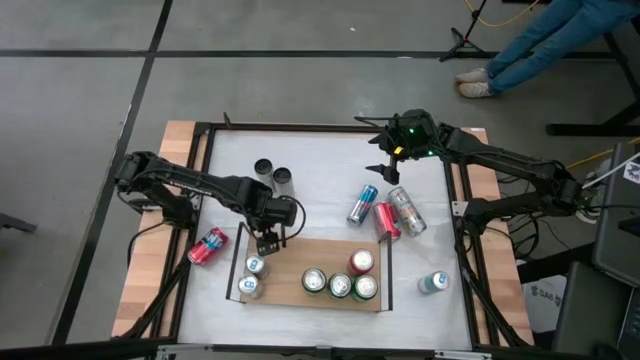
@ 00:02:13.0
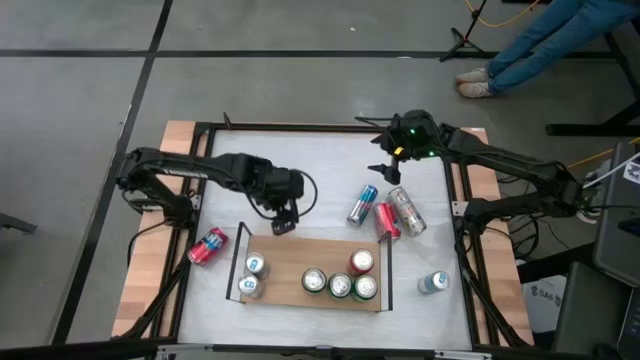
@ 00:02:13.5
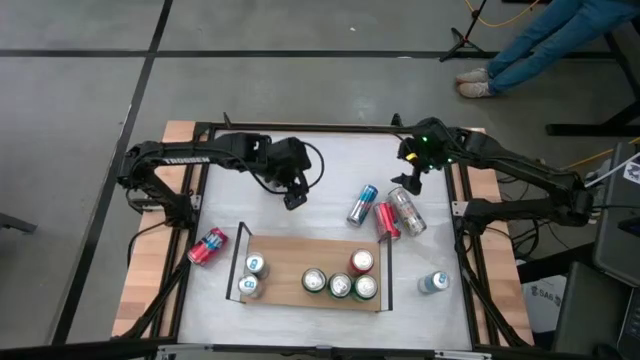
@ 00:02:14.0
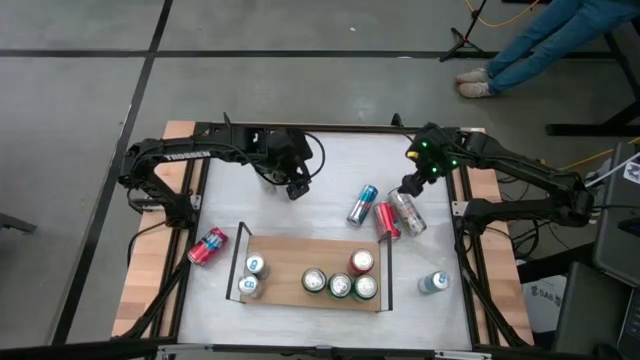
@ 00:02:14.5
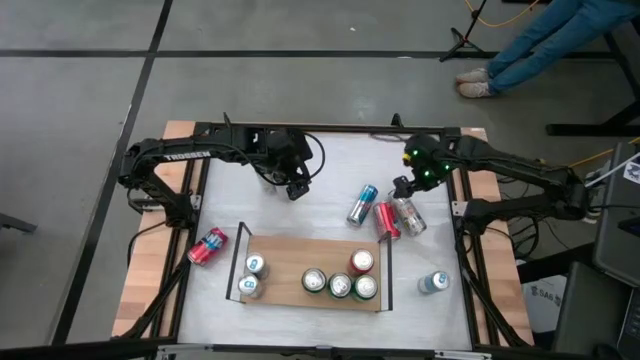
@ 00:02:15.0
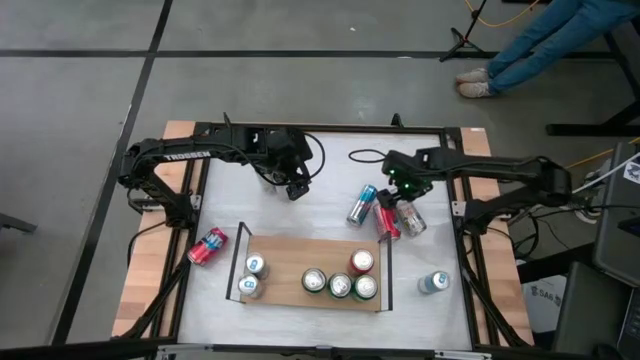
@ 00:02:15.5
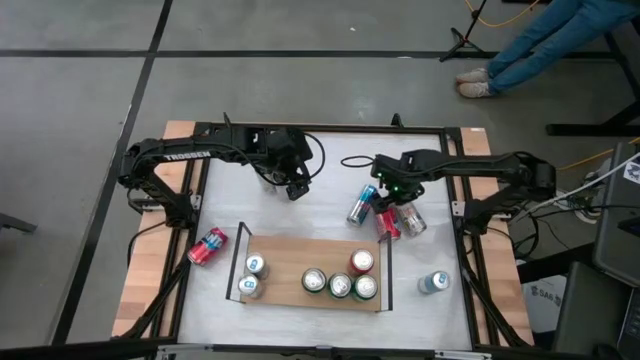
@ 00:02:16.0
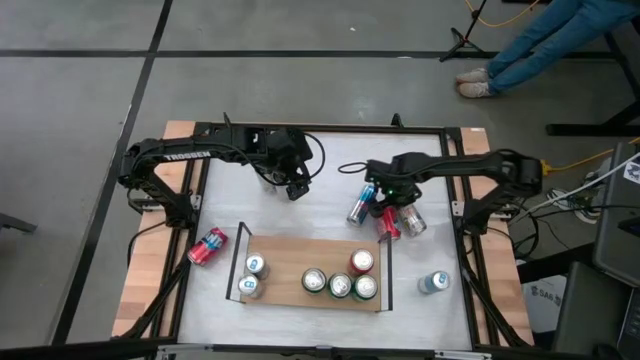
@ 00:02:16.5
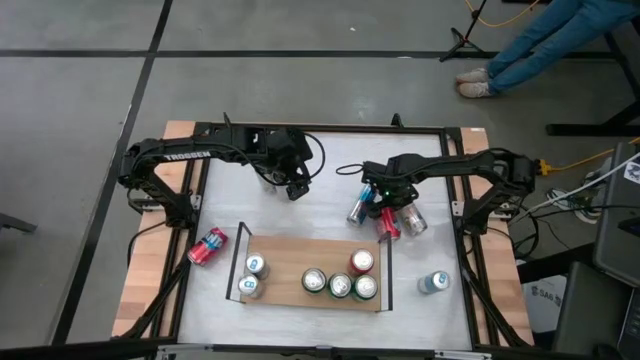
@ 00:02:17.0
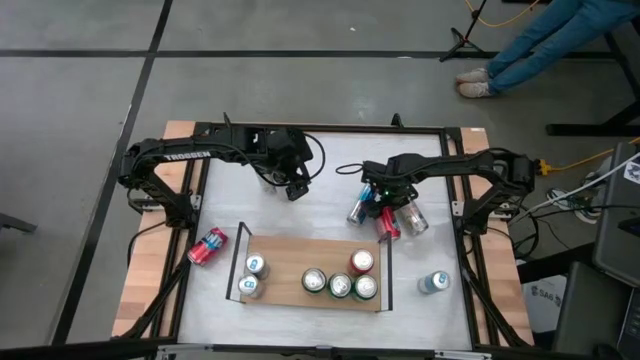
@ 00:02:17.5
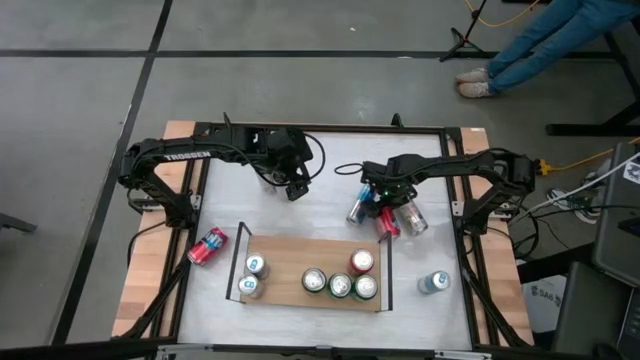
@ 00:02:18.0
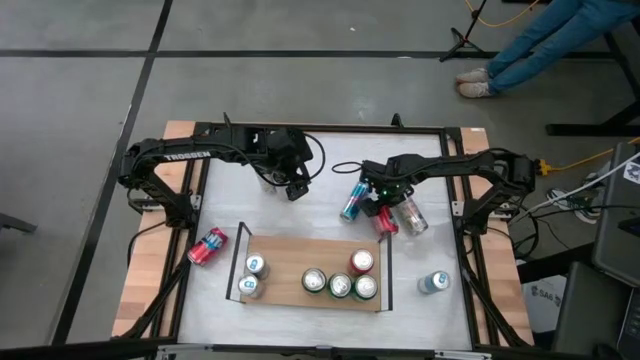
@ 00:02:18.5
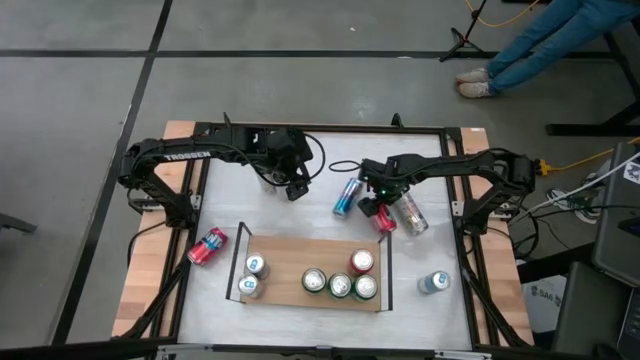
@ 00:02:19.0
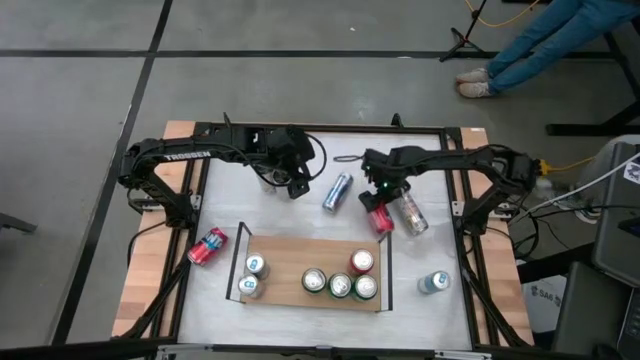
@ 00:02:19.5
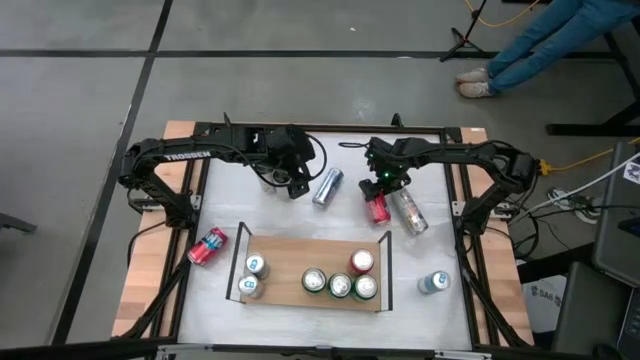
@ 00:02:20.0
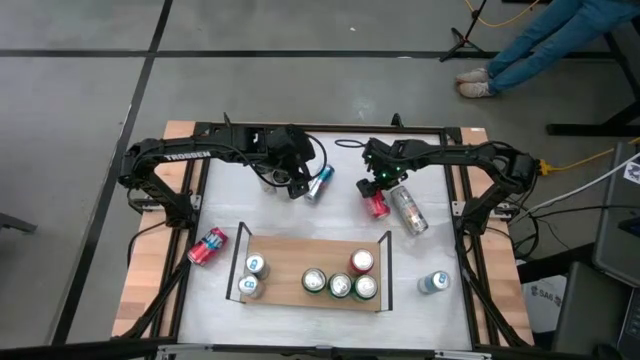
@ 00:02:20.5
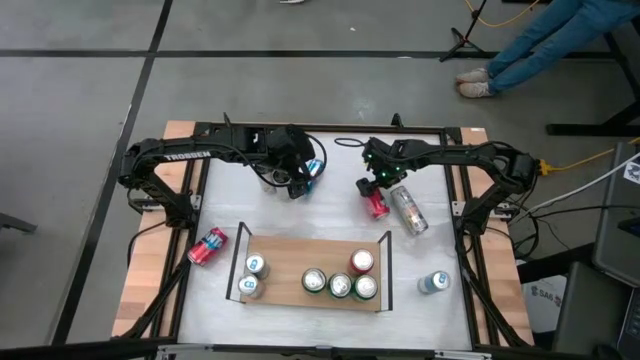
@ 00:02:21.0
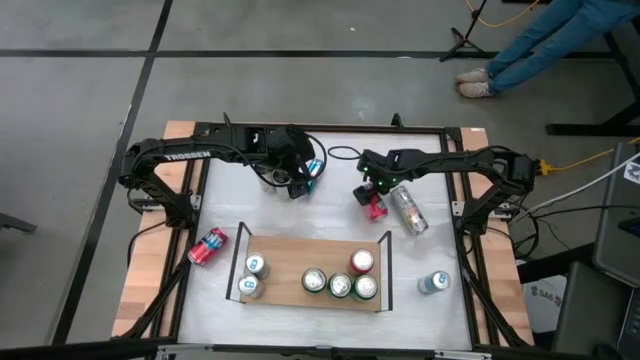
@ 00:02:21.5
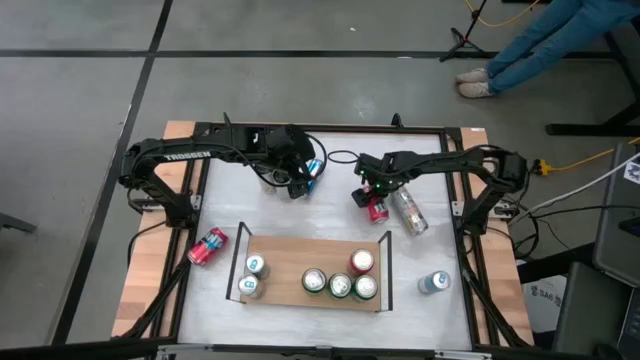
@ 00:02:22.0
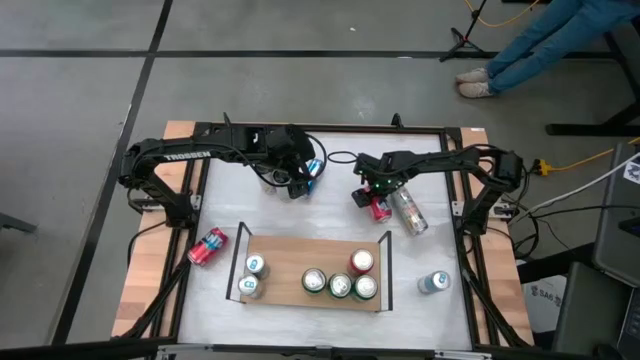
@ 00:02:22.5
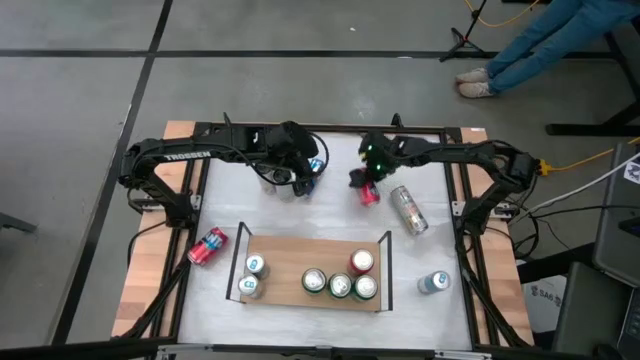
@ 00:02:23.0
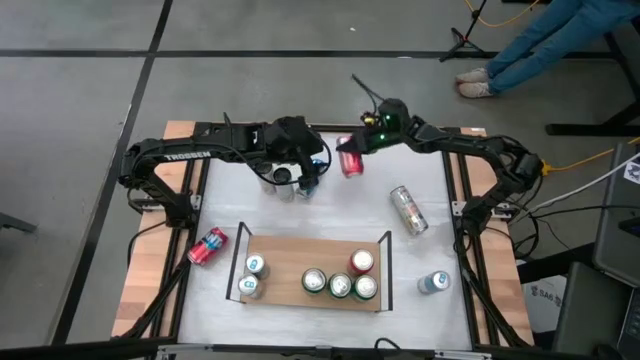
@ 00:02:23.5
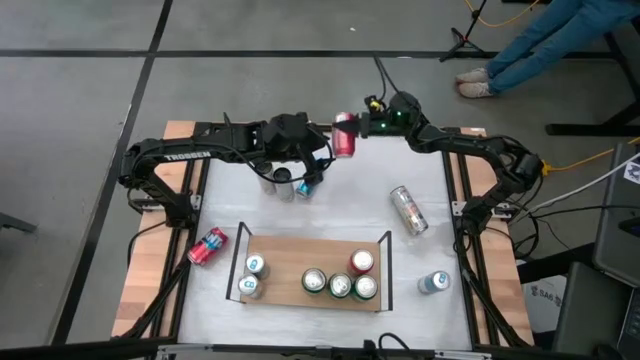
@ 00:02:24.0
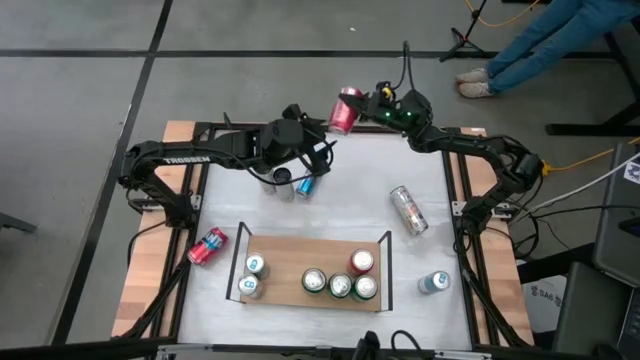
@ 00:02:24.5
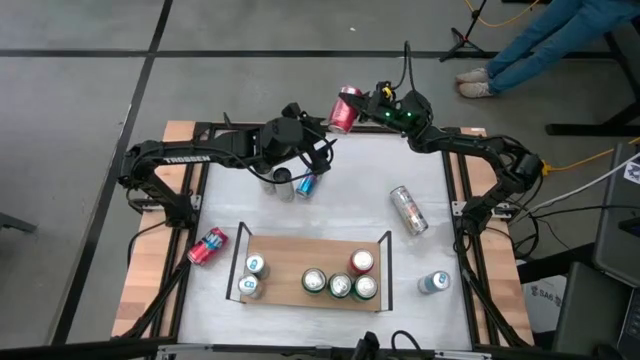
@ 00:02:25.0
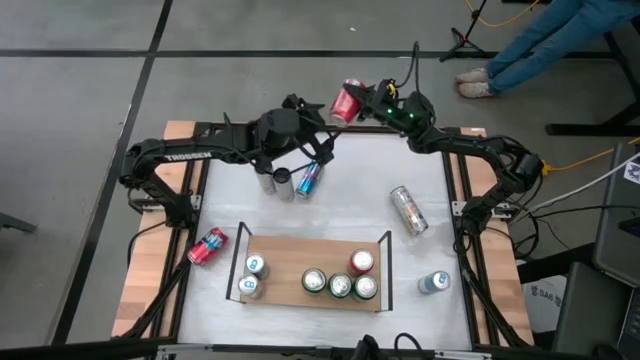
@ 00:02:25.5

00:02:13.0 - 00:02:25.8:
Task: Place canned beverage on shelf
Put the right red soda can on the shelf aligned with the other red soda can

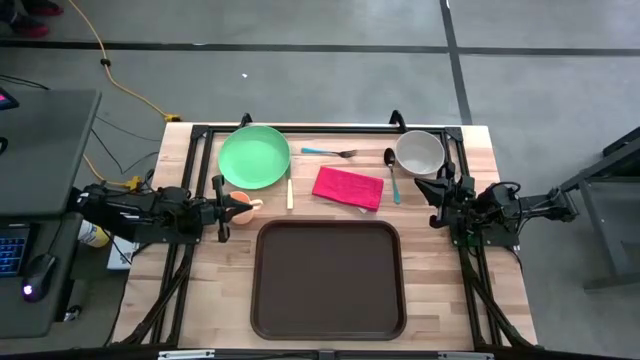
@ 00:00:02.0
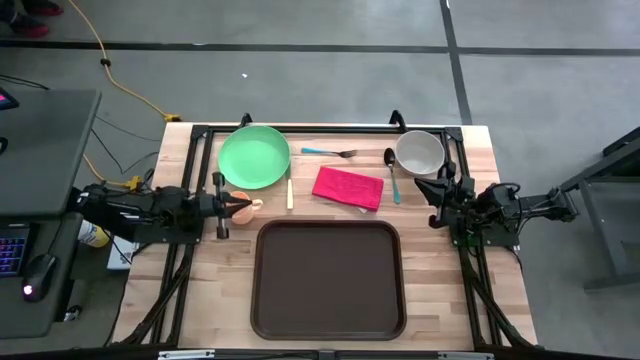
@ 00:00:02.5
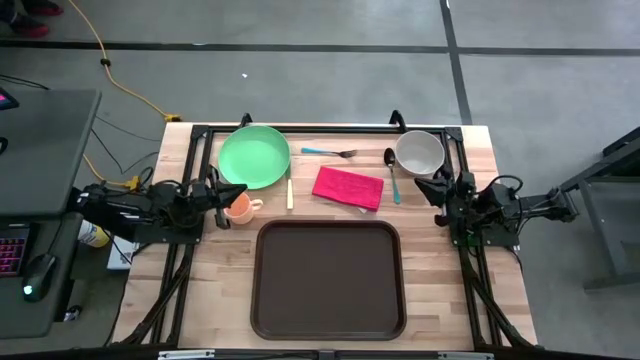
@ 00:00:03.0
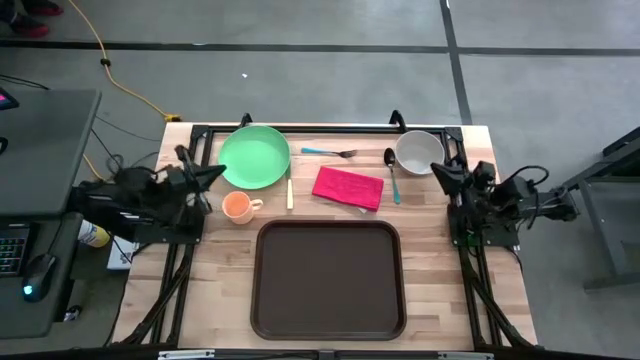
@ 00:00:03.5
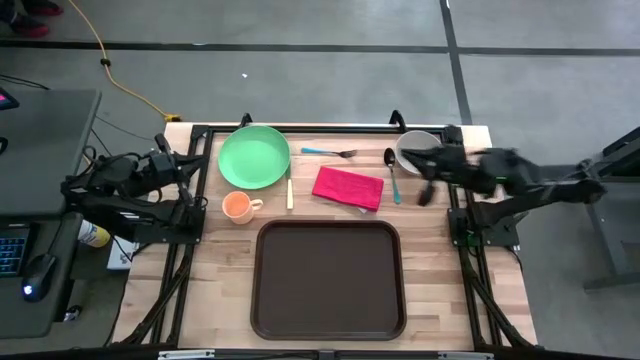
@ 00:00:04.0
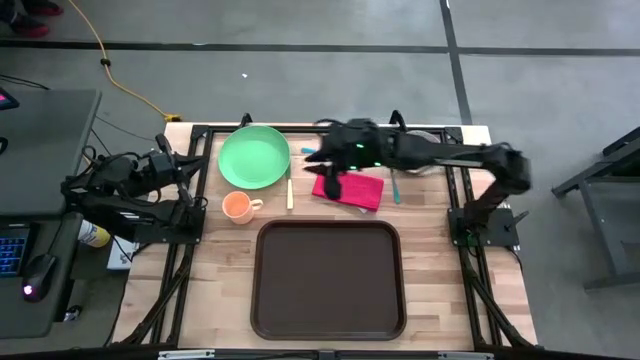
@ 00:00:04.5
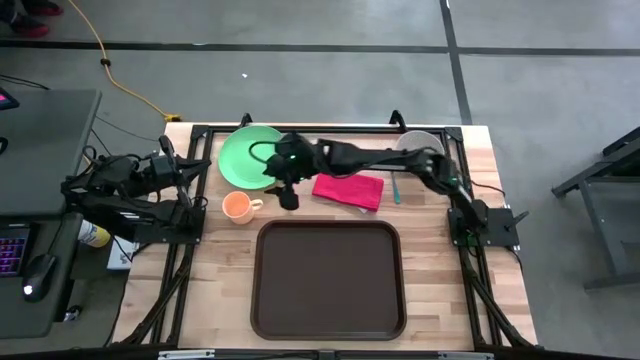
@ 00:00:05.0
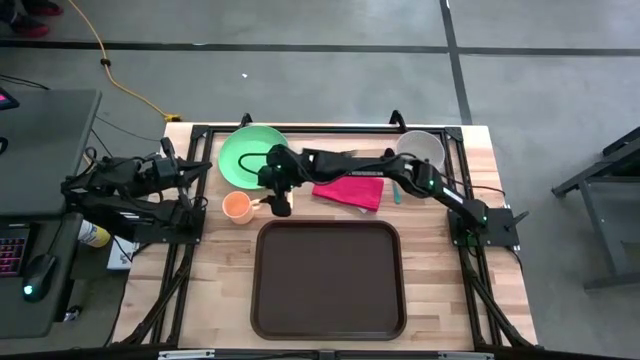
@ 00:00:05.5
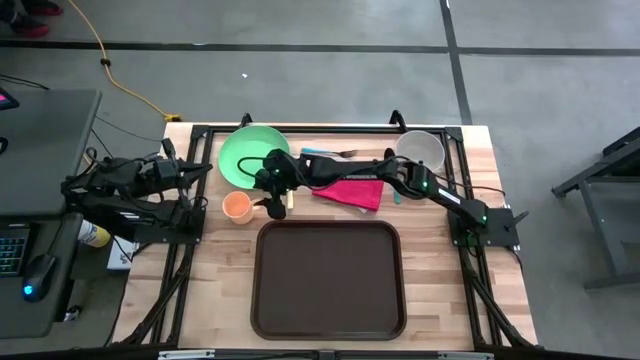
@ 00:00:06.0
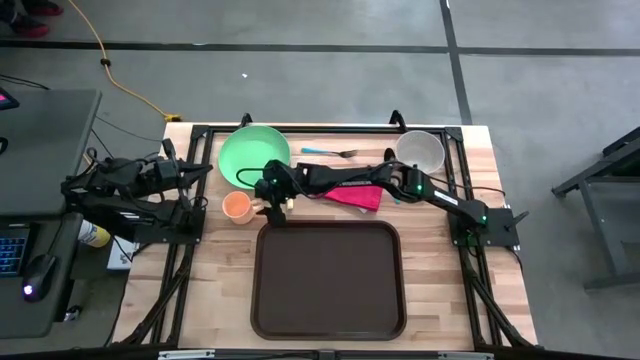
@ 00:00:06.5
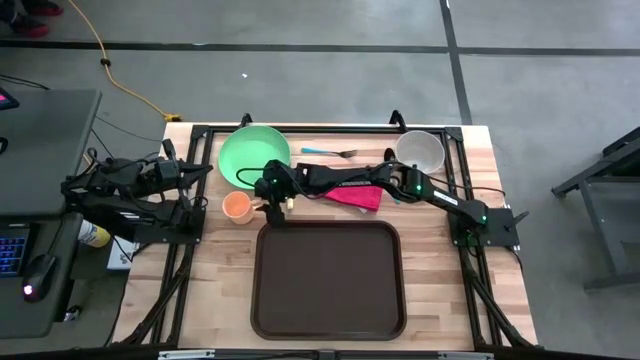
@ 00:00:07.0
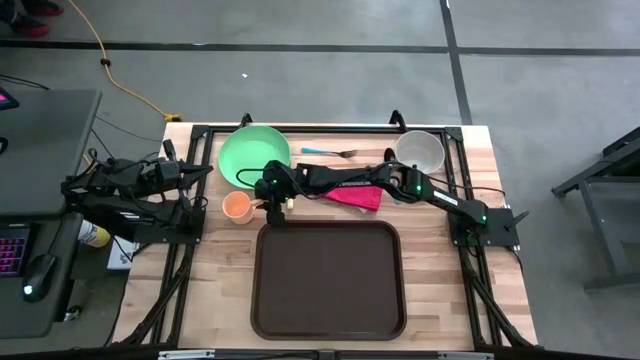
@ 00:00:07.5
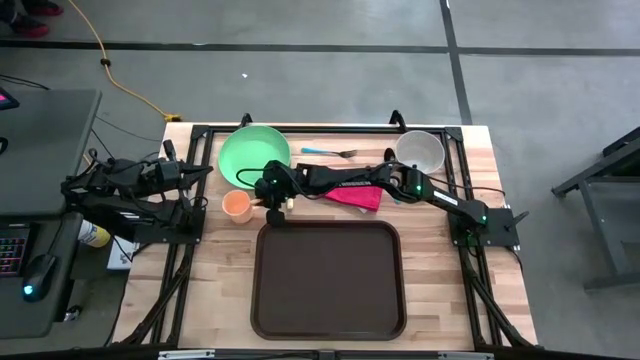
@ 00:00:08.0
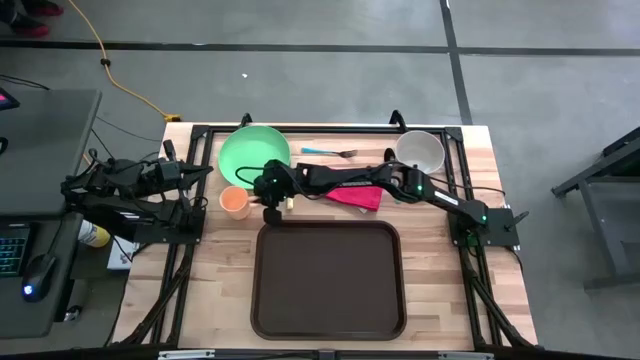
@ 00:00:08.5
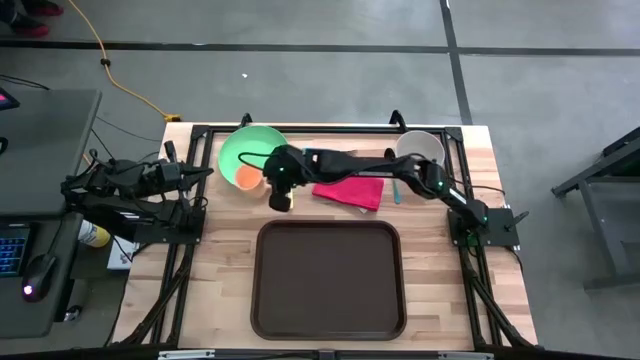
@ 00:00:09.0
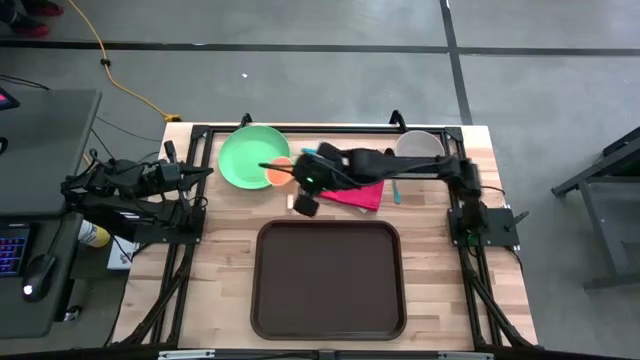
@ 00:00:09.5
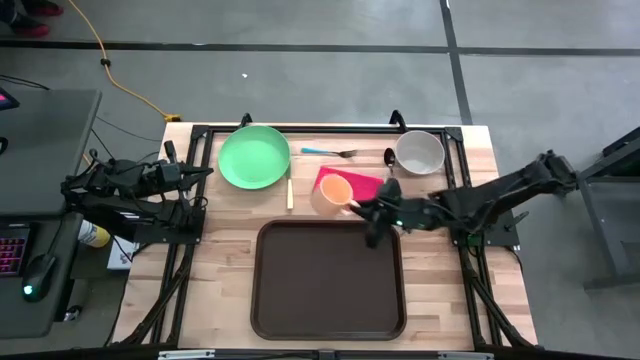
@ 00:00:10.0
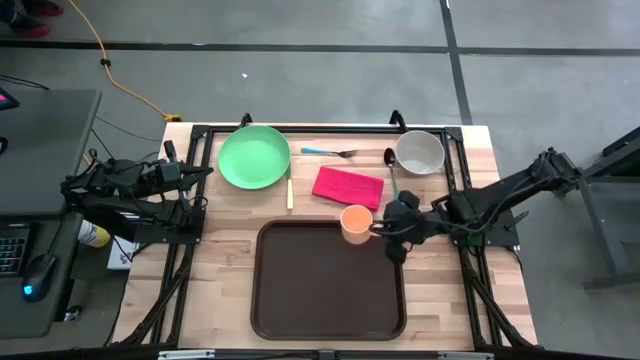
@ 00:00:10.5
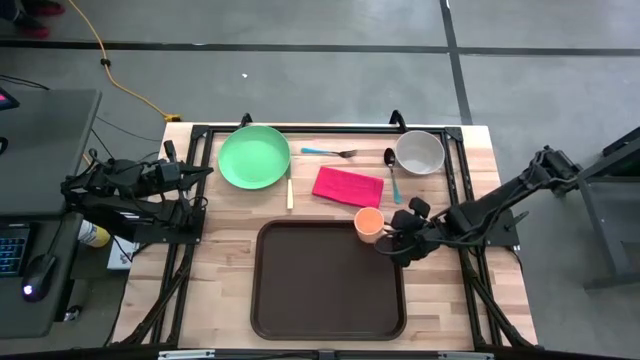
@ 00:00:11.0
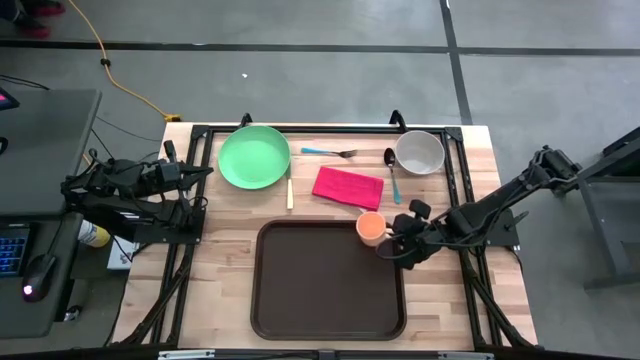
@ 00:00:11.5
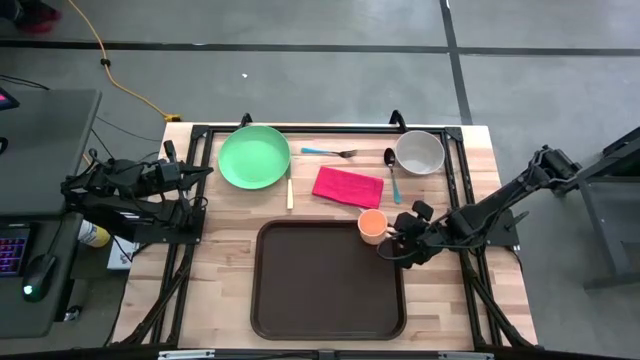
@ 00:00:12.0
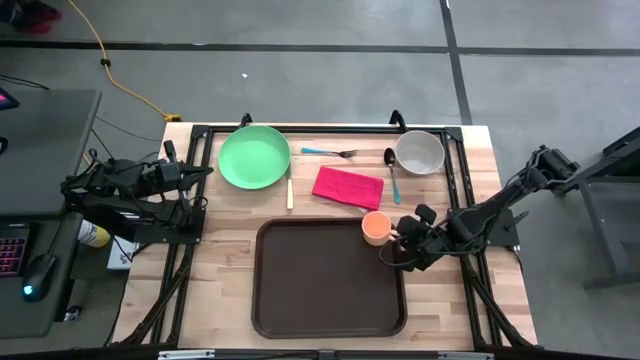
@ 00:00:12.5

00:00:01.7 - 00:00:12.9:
Task: Set up tray
Put the yellow mug on the brown tray
